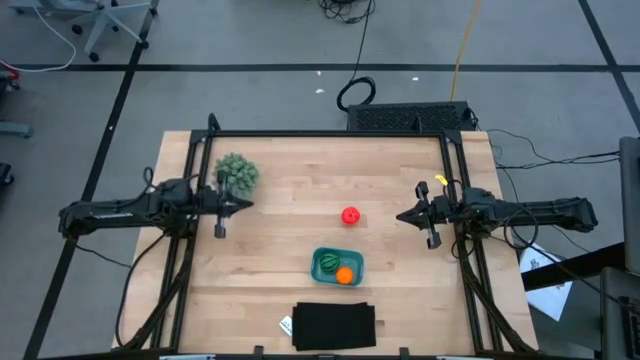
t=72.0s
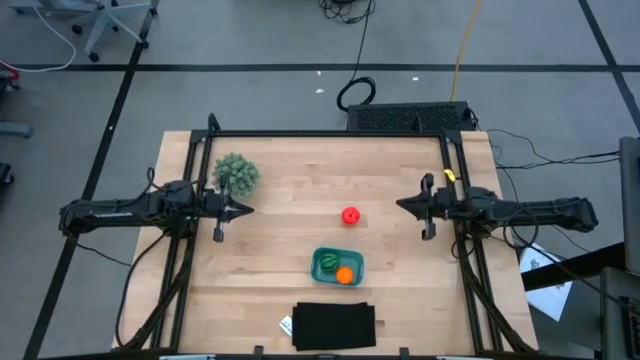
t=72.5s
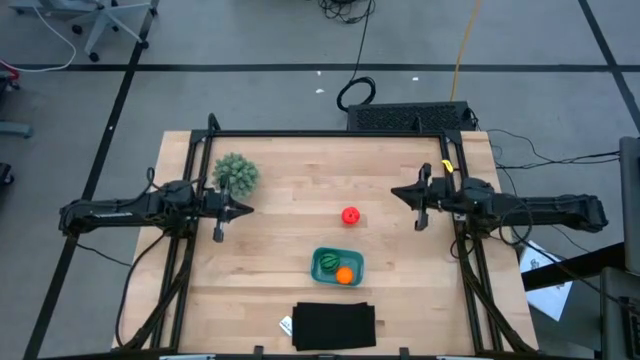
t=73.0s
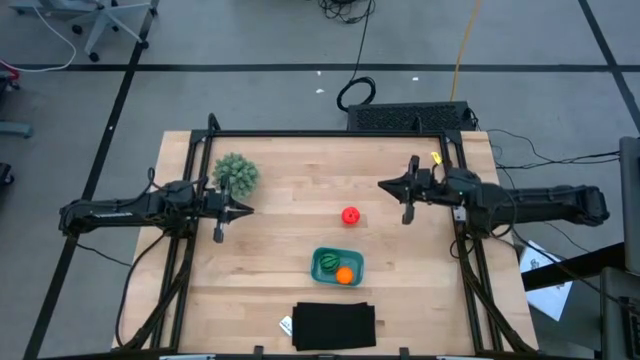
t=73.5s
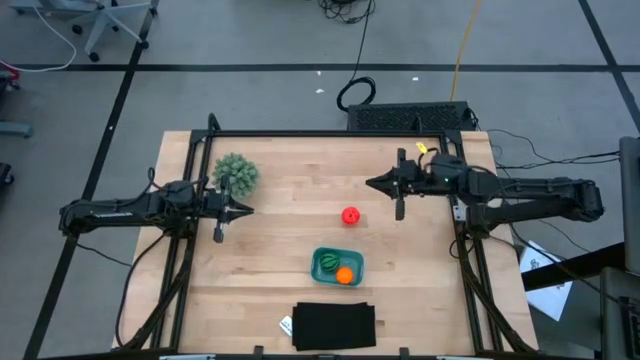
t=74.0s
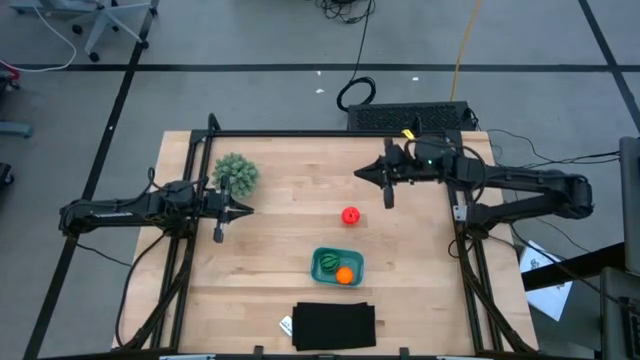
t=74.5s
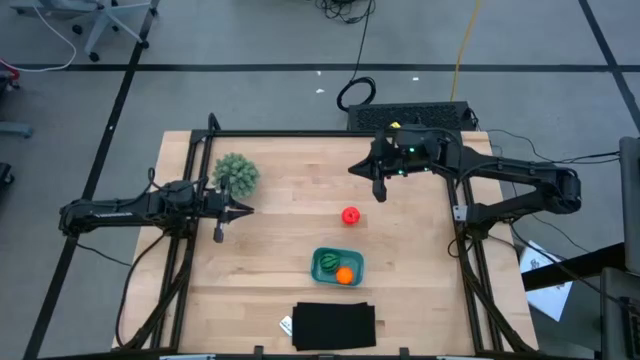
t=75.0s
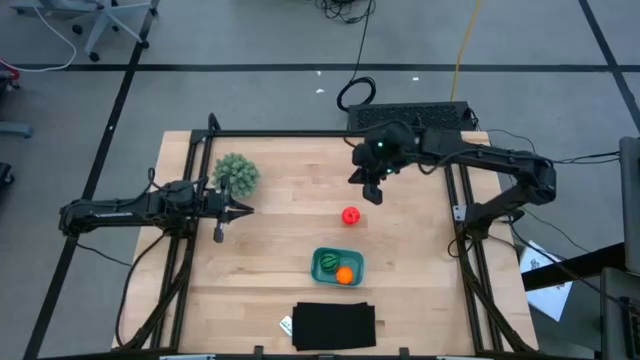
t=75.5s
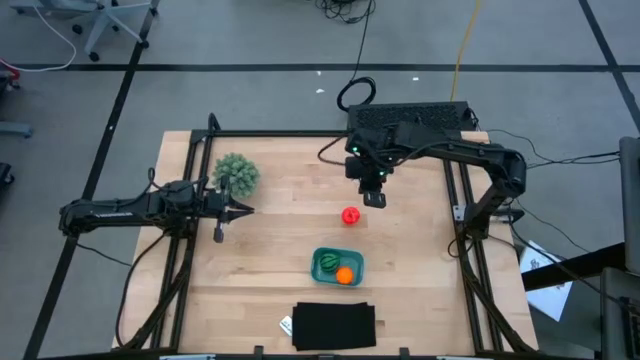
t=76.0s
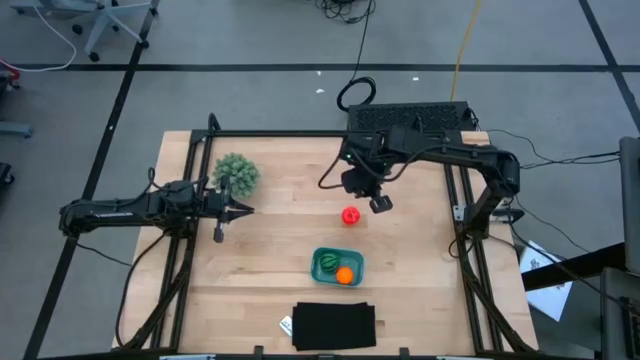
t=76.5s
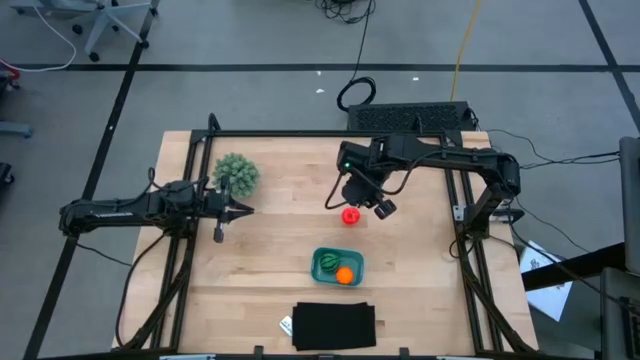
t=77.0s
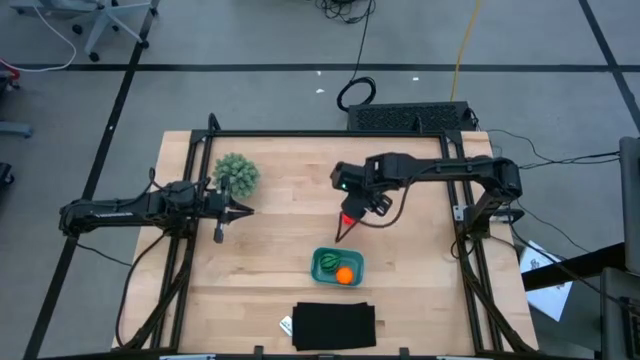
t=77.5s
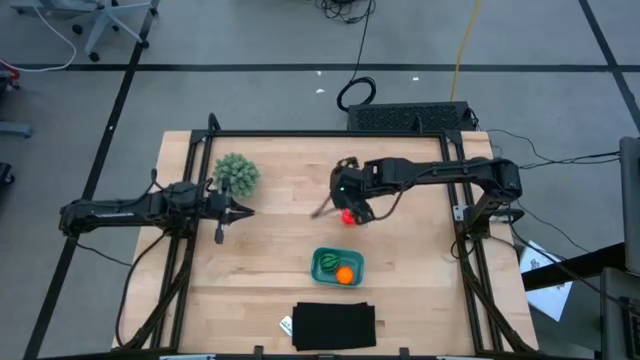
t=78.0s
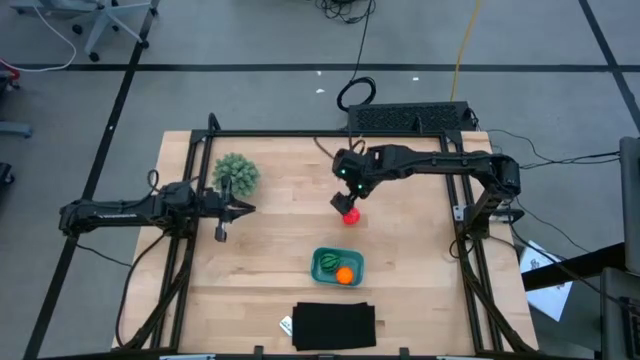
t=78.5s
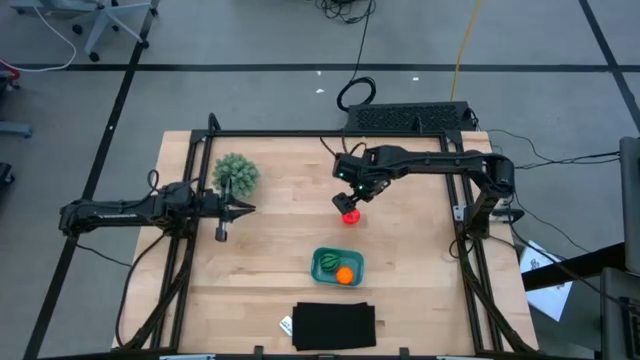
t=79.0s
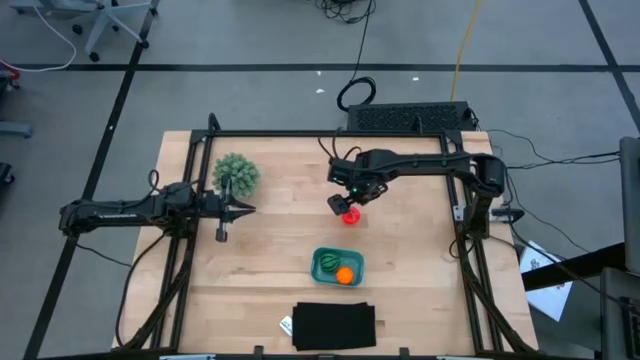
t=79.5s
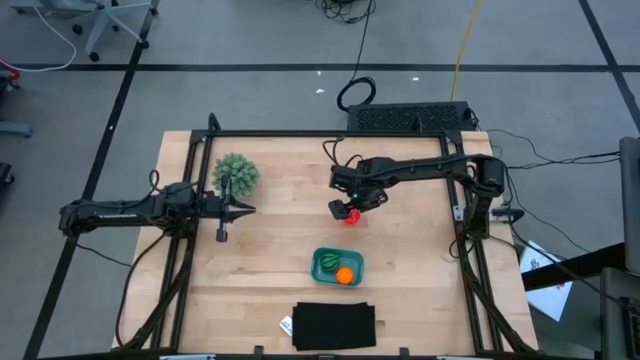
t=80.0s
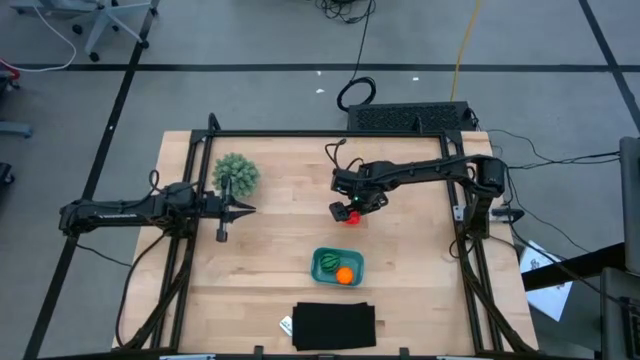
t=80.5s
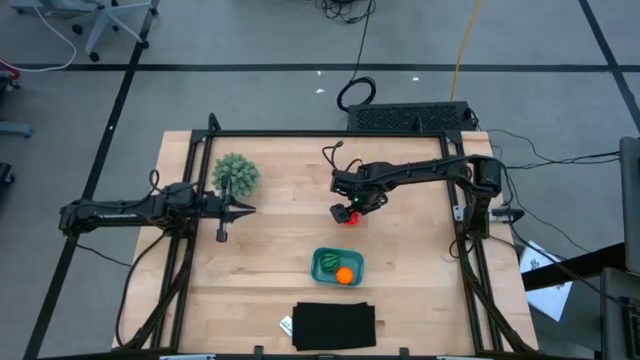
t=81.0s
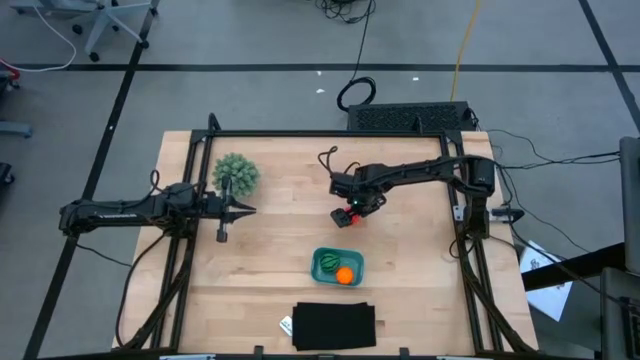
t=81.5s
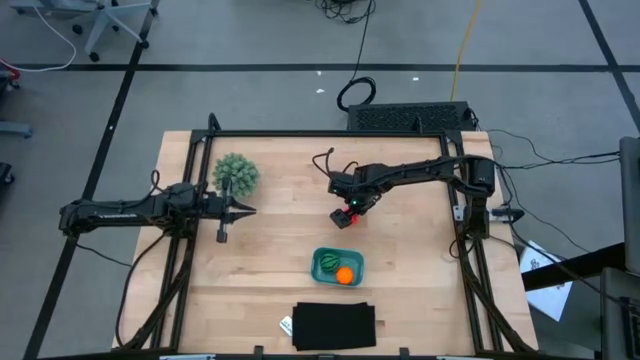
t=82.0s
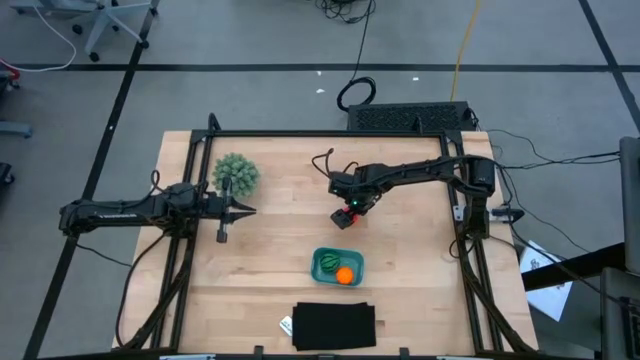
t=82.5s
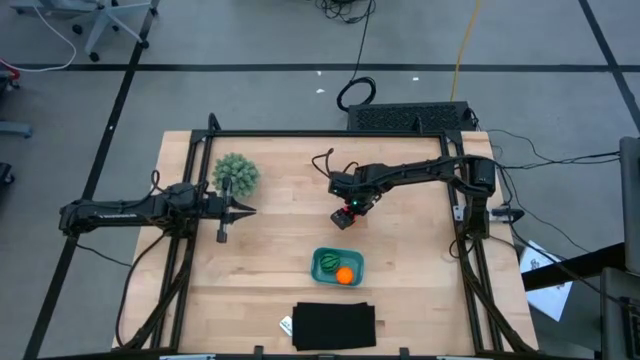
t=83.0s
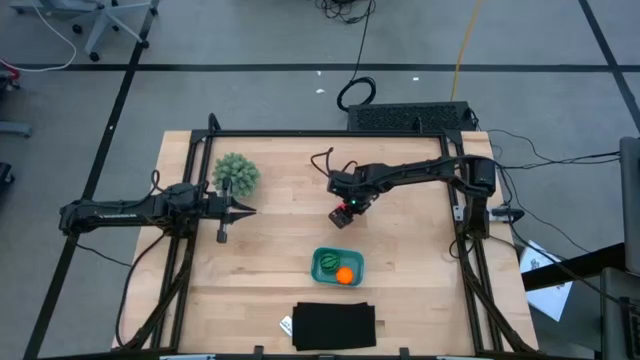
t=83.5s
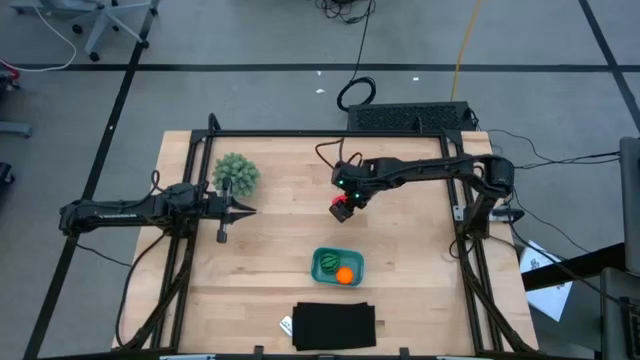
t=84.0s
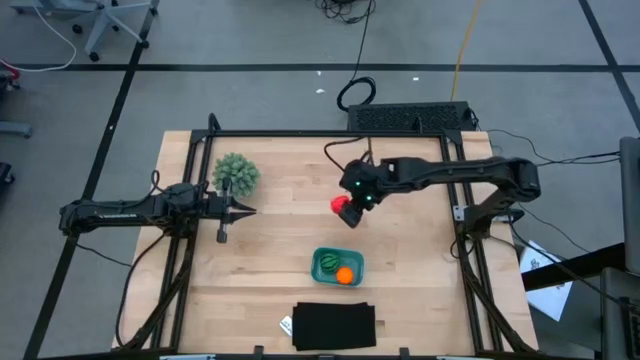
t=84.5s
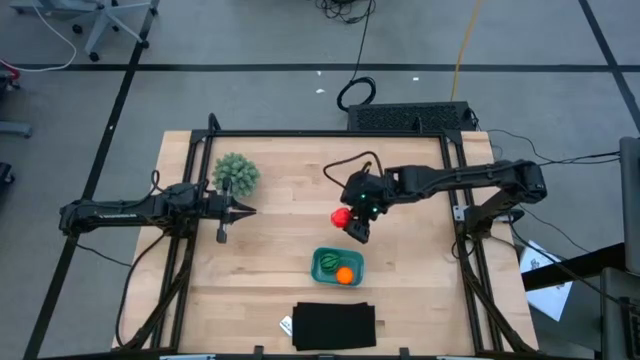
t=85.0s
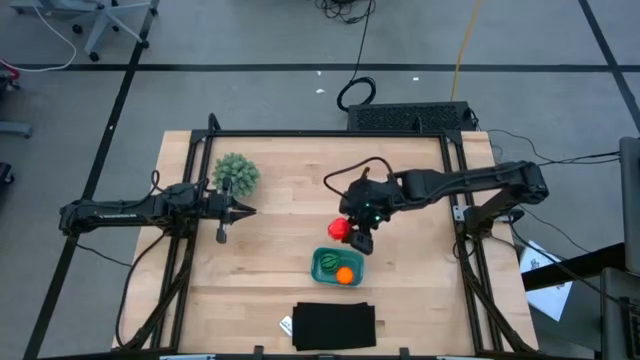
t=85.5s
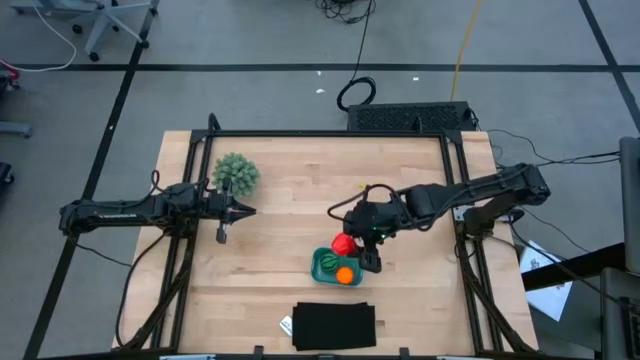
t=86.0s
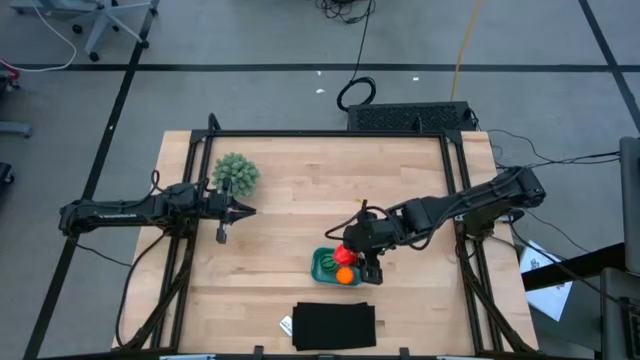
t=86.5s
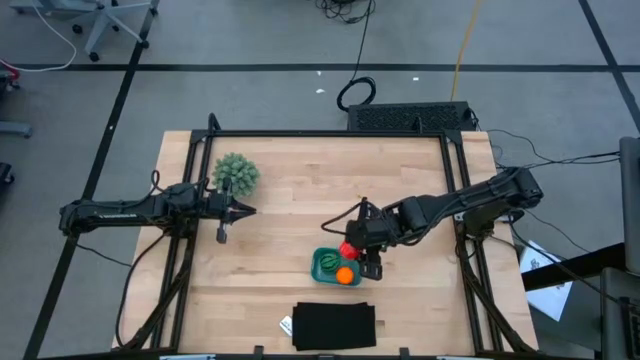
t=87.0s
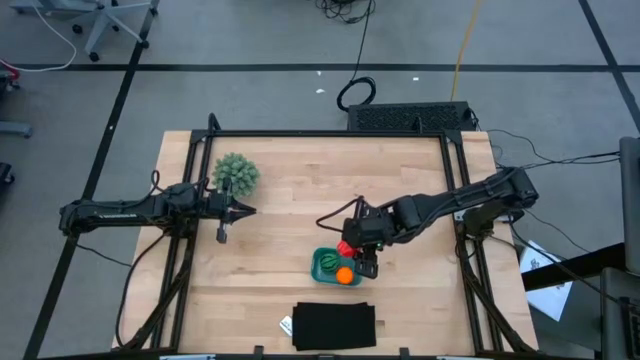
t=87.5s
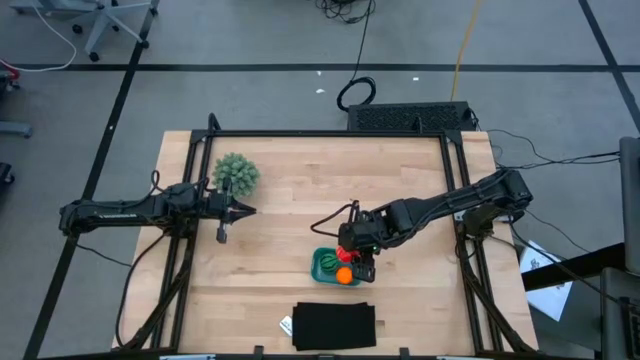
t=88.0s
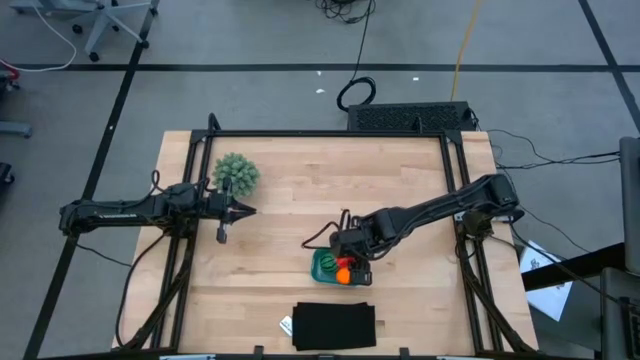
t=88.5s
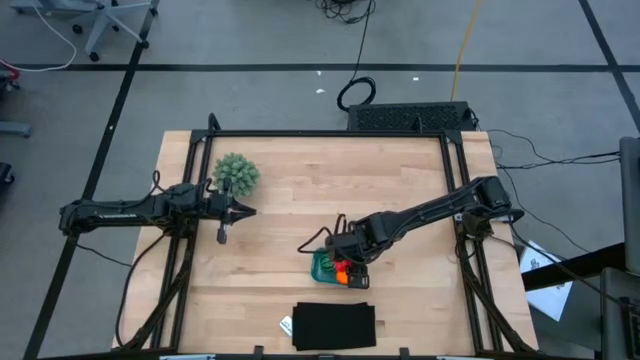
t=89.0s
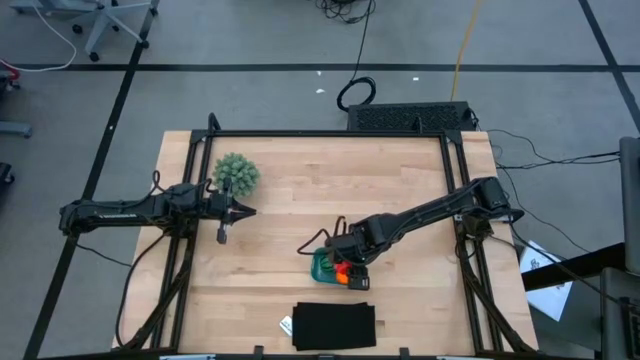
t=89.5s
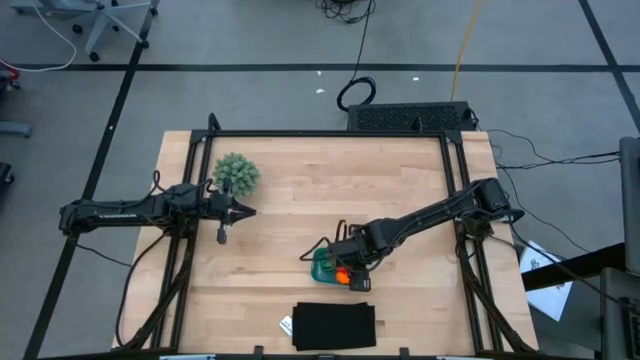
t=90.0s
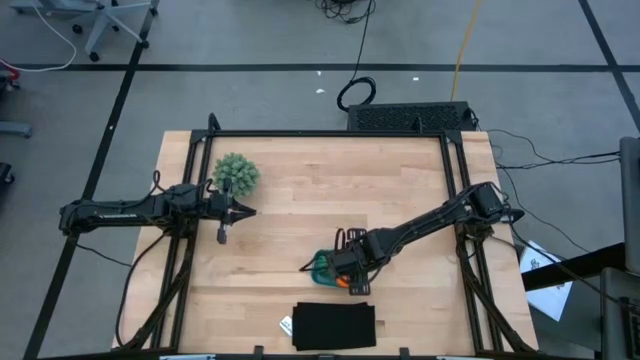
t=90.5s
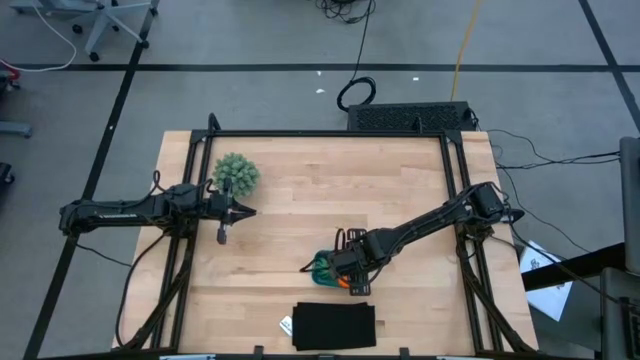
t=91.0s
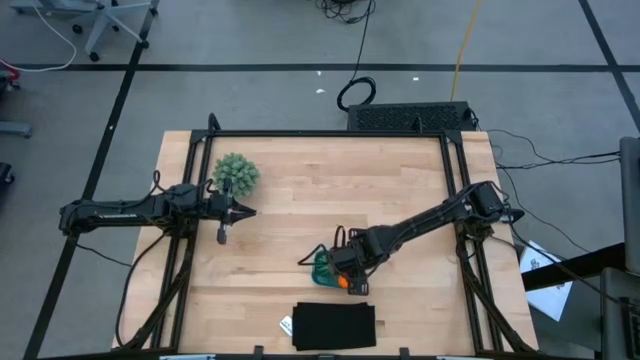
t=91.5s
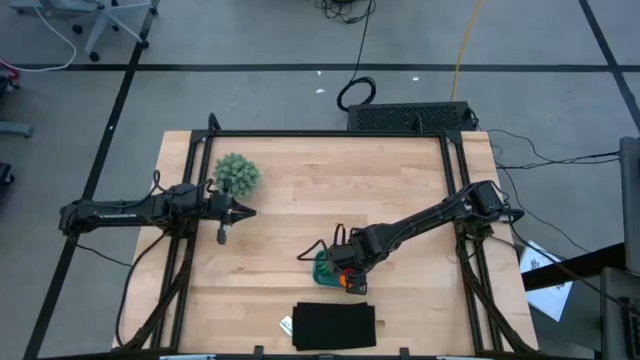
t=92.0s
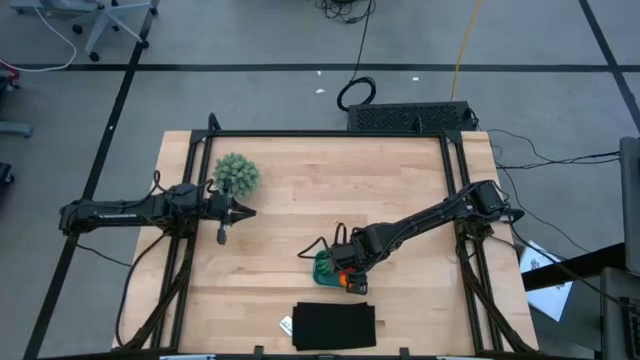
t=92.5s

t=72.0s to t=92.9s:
Task: Pick and placing Produce into tupperware
Put the apple in the blue bin
